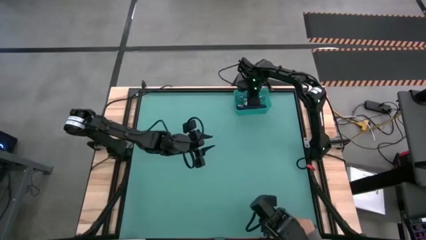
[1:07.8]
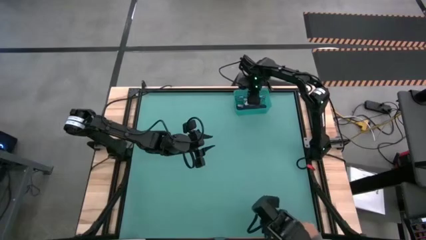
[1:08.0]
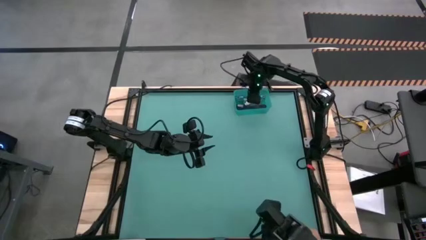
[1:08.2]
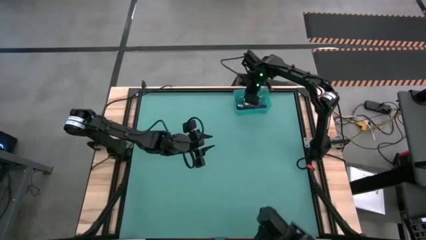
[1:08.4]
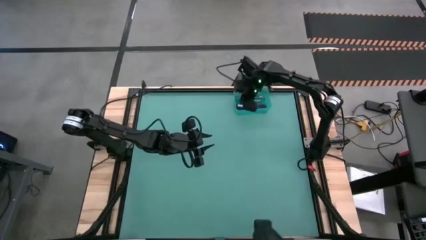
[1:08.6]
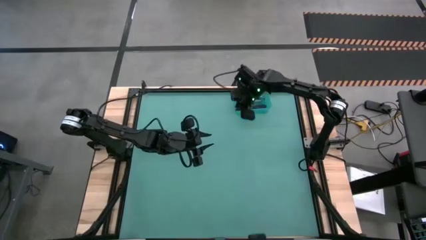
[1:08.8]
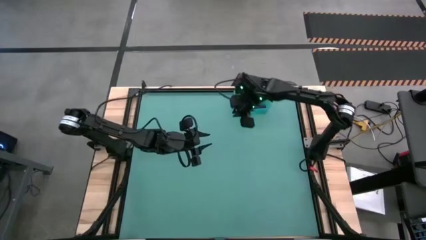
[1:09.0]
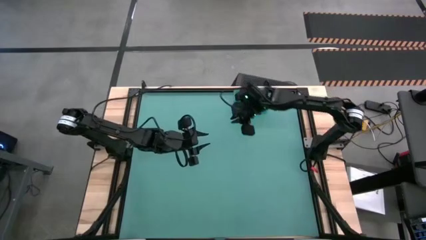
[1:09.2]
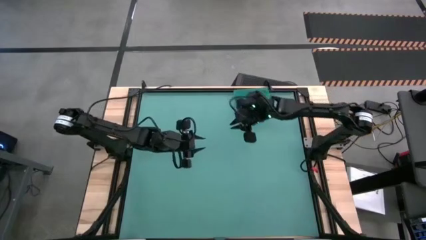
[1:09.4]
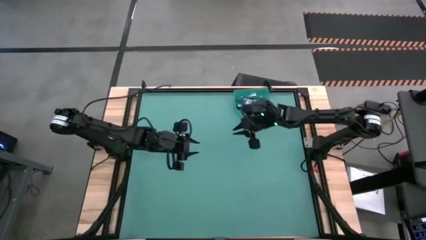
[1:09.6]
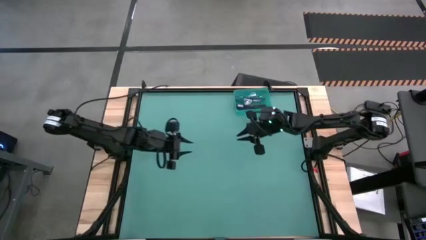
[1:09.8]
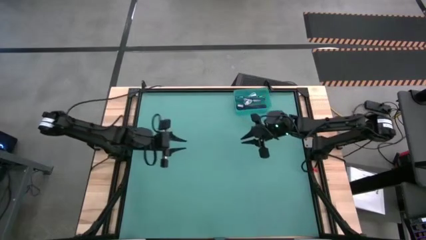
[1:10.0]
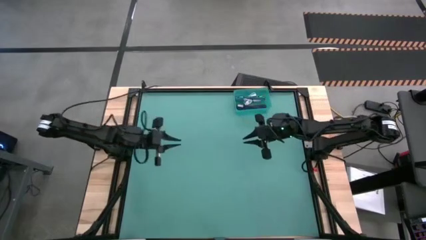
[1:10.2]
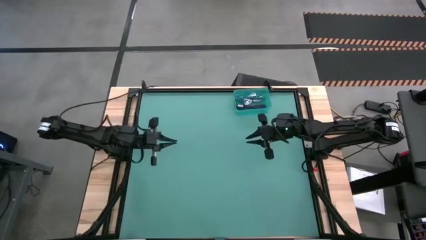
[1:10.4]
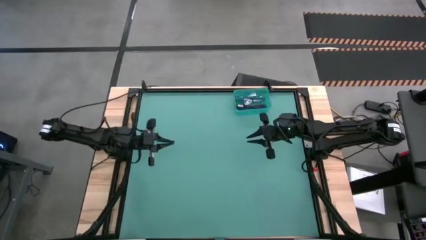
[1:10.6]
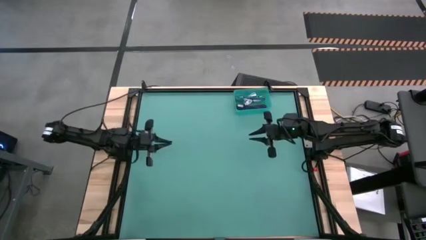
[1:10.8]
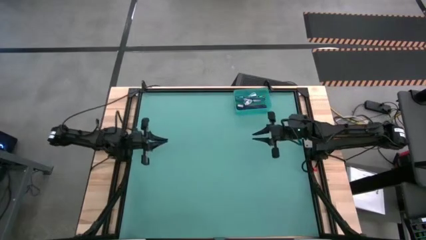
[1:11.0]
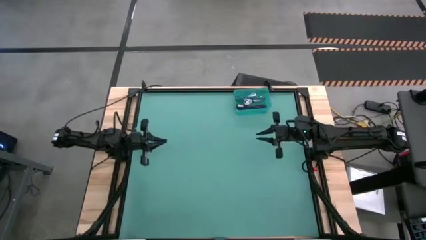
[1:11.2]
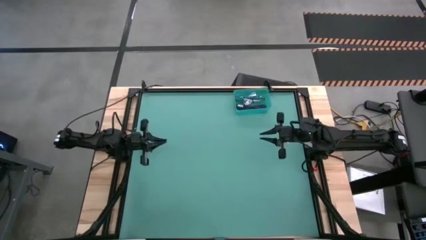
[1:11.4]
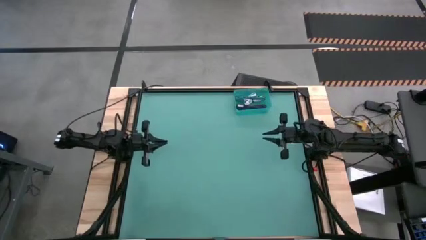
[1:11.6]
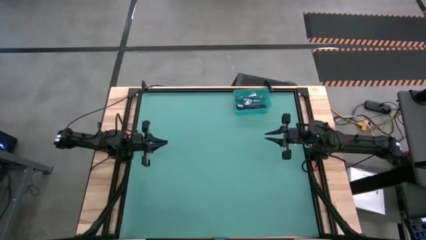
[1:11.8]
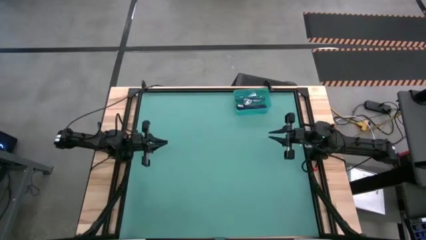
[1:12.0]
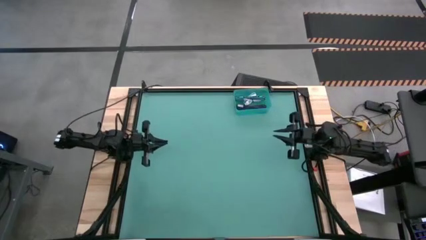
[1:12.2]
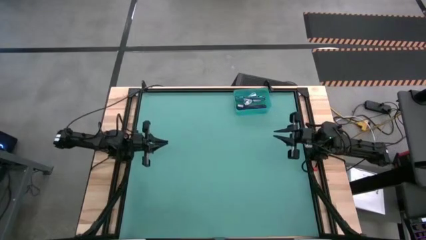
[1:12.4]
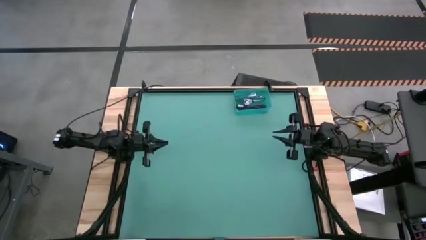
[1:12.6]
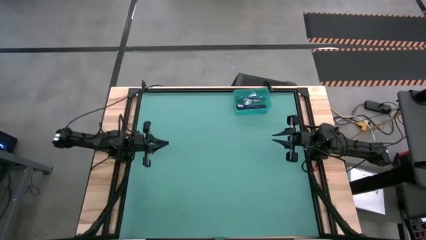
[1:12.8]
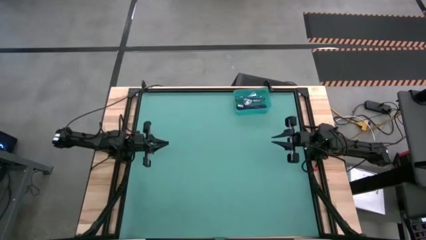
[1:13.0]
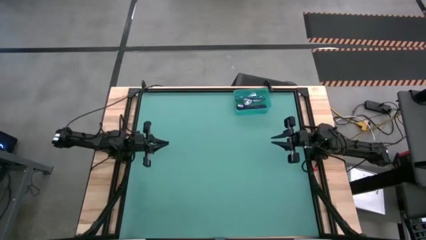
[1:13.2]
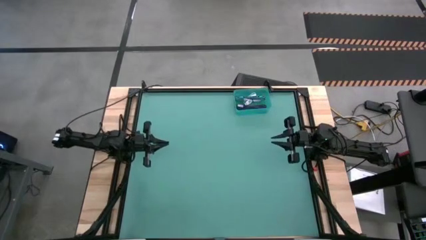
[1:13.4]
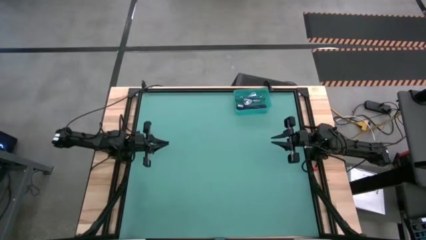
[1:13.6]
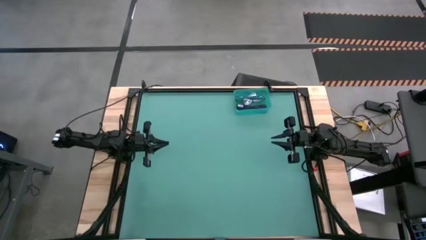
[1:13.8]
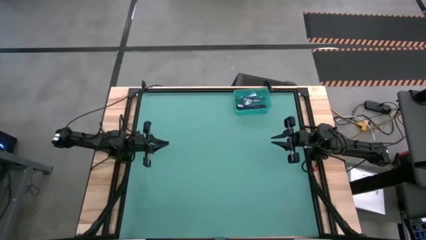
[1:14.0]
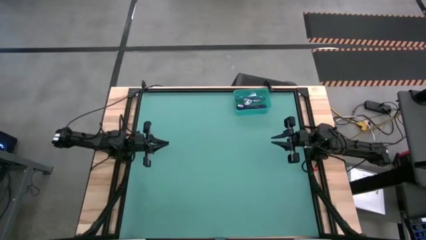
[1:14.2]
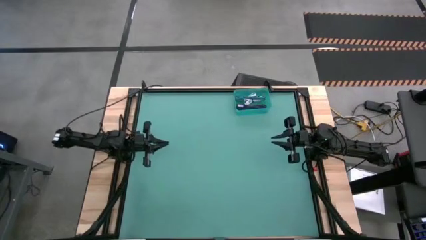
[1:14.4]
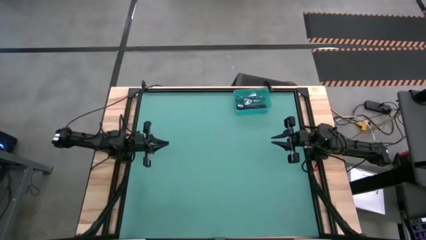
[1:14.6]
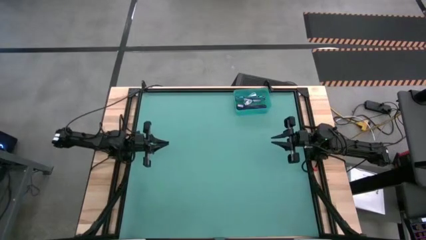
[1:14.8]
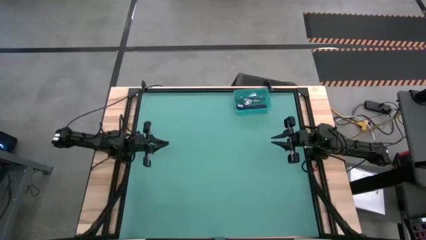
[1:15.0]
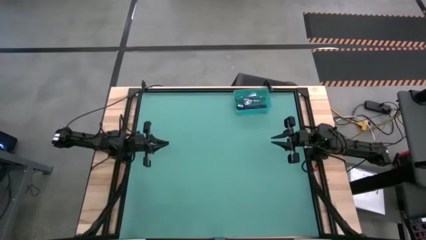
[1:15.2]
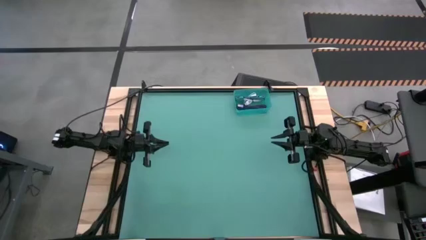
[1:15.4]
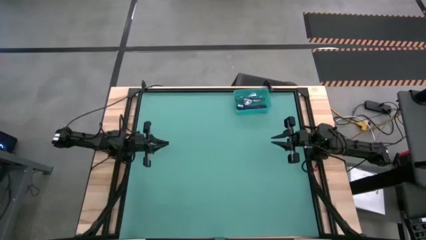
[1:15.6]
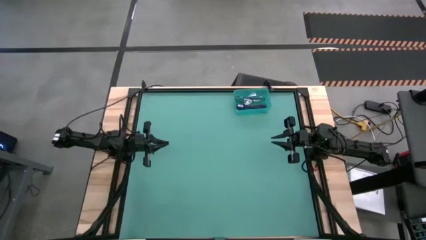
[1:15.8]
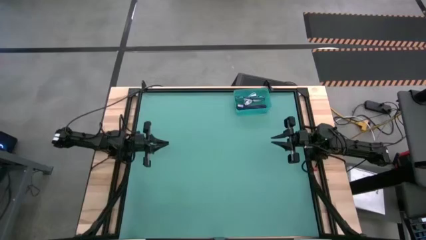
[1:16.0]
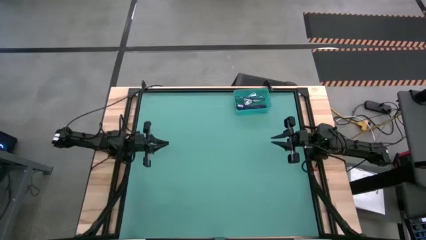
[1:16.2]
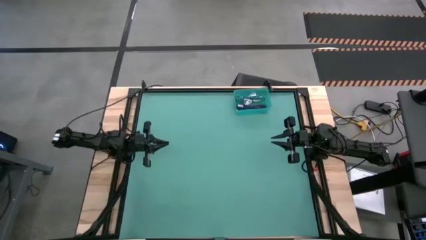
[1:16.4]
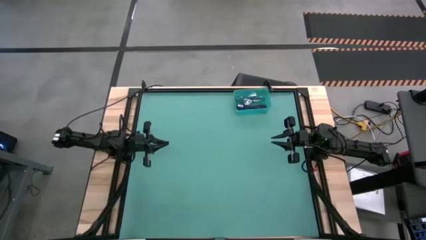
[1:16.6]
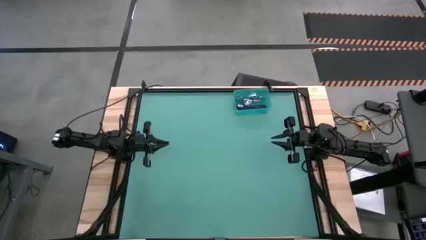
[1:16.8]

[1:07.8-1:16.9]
Task: Pick and place USB-C Cables
Return to Home Position

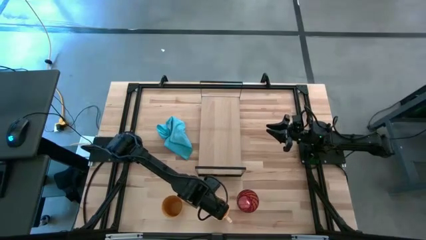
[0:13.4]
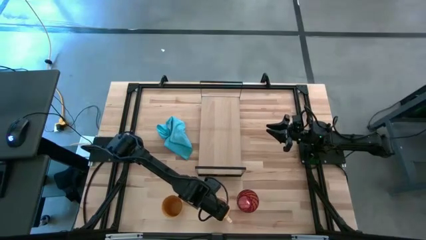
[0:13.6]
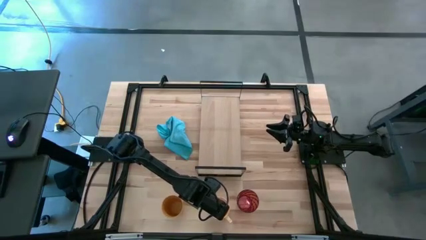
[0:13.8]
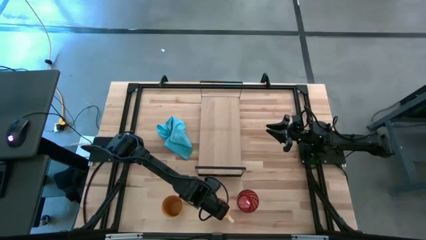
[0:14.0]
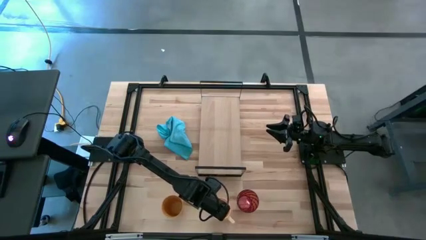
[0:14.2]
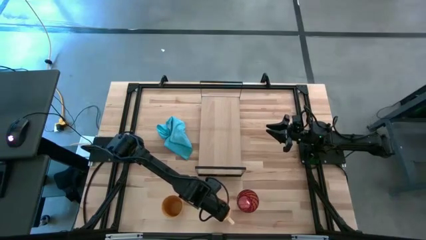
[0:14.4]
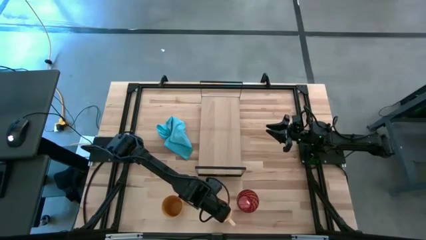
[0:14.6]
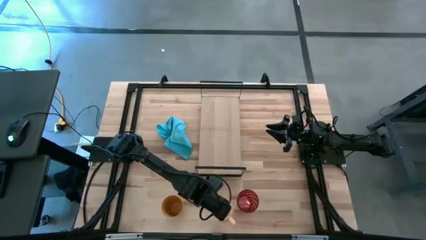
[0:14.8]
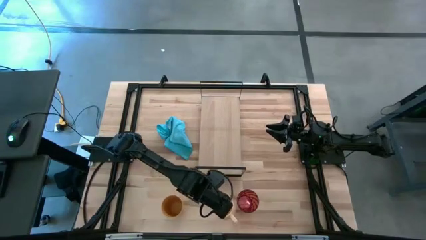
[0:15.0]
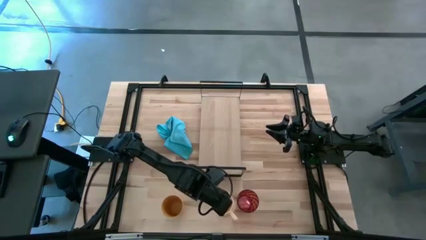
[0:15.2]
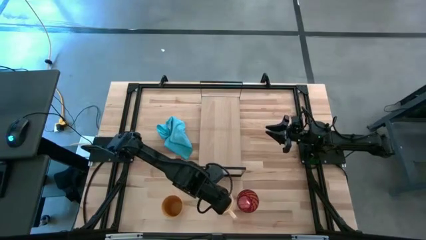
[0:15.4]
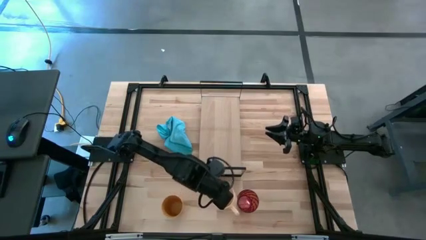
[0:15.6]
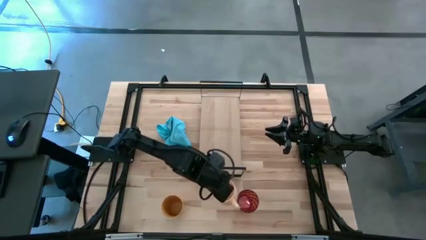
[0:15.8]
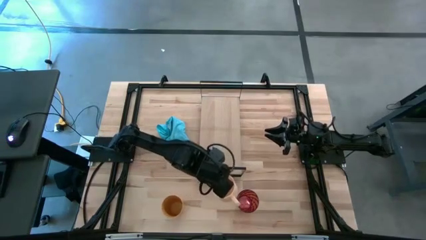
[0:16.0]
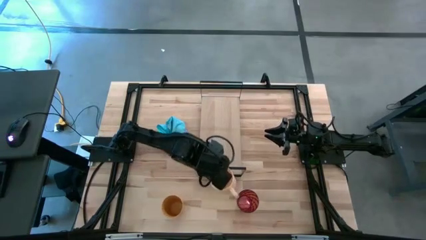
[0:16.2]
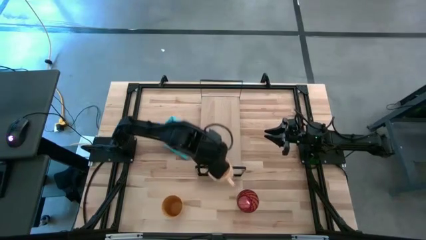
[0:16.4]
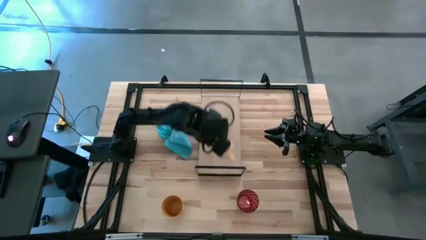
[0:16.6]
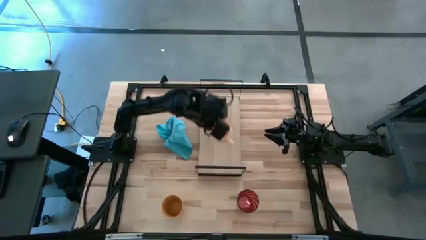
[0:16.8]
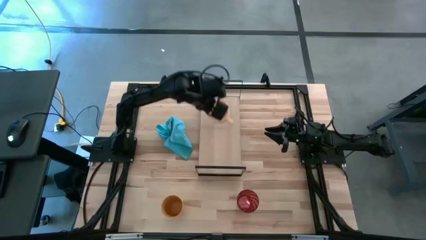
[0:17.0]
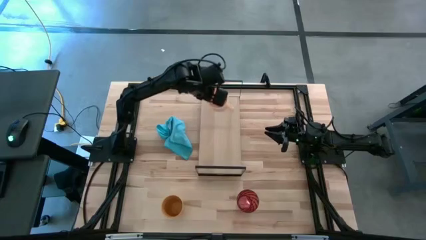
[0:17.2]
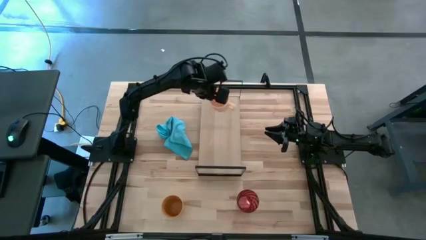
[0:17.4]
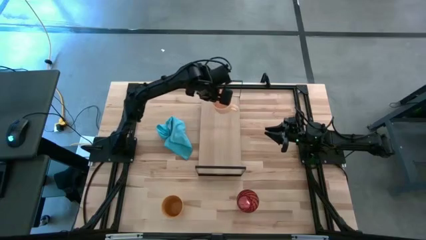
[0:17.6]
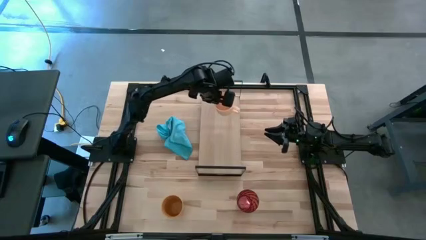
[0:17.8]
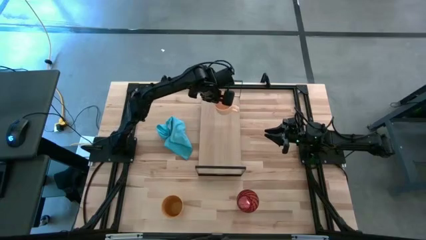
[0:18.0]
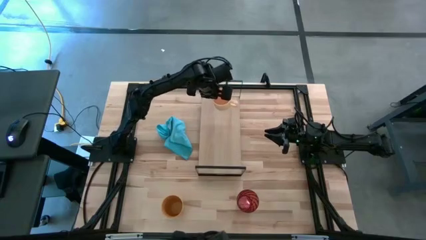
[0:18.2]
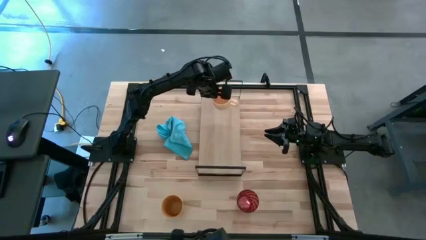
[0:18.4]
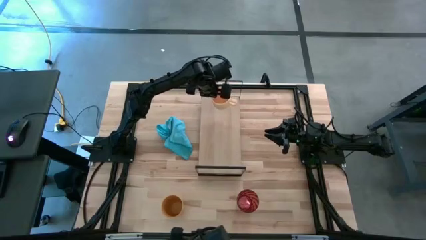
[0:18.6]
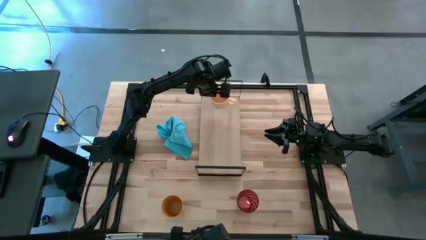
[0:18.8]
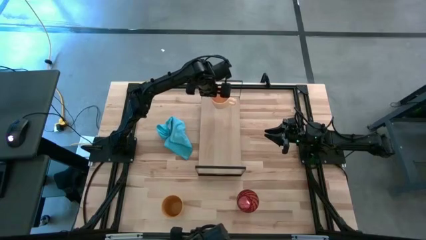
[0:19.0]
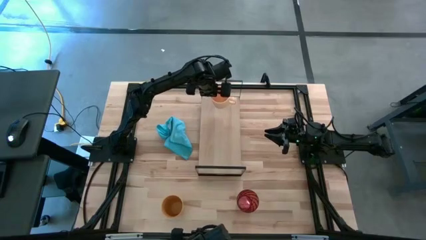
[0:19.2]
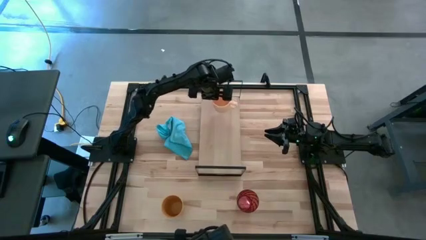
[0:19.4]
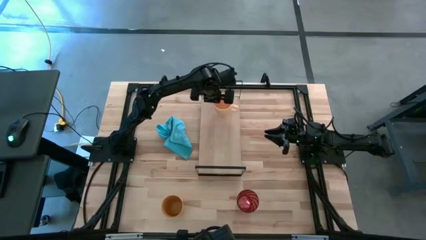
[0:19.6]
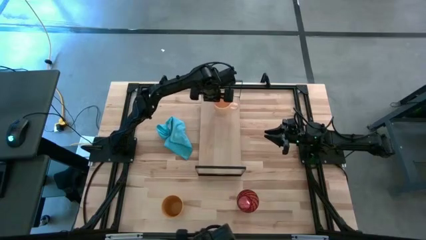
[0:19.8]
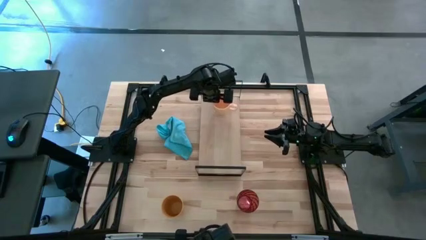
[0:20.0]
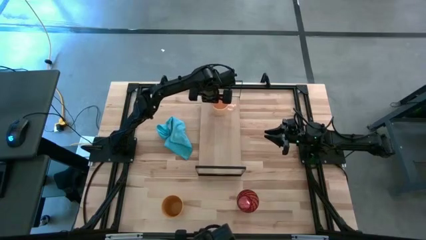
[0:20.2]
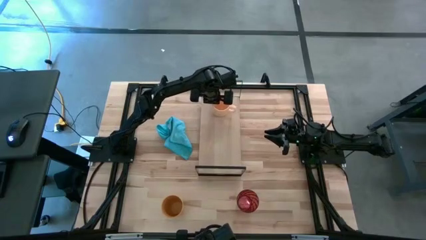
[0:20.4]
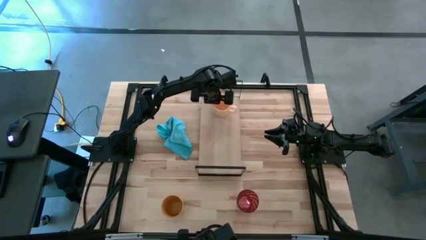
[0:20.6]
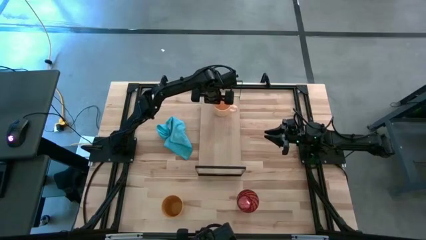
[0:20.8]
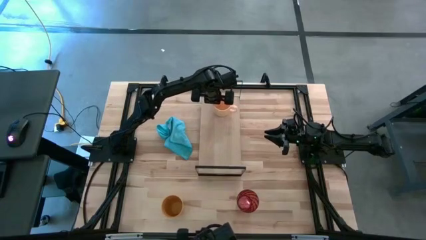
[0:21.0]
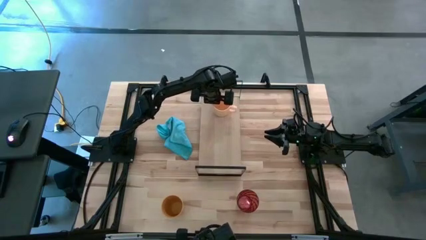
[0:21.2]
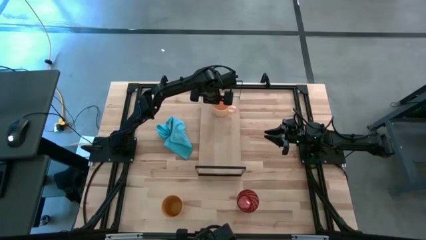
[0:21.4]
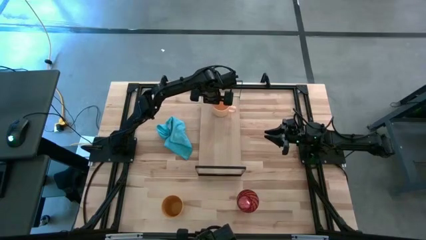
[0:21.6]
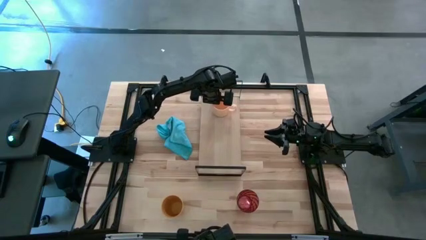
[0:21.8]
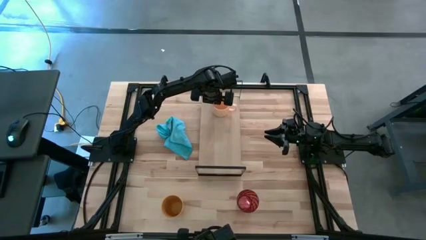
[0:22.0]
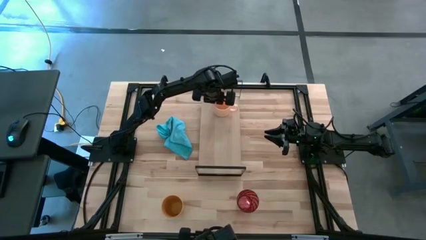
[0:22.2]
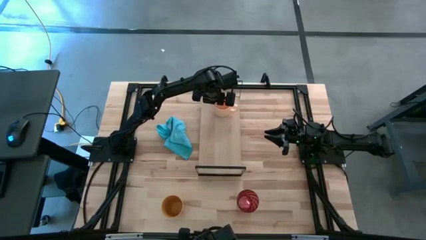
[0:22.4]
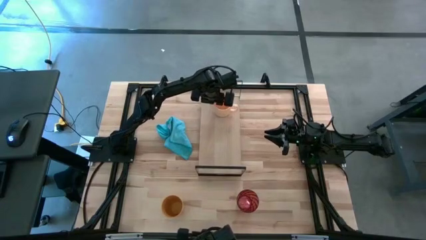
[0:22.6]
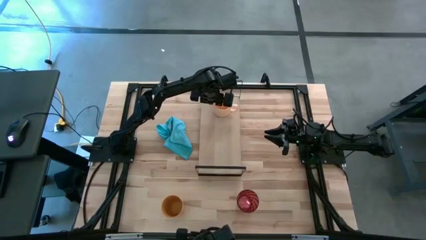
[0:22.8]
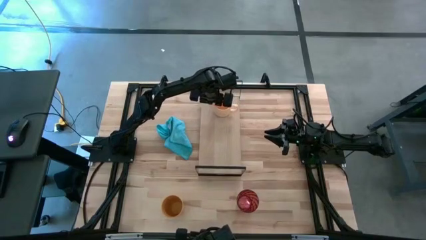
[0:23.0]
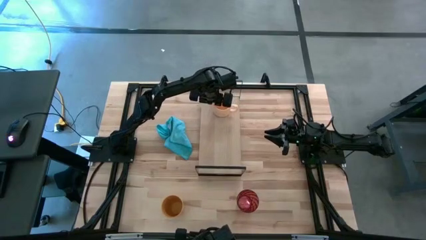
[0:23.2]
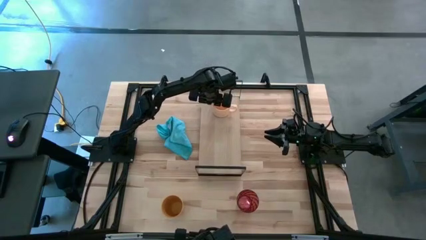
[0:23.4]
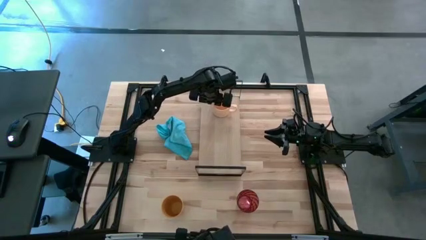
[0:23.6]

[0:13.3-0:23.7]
Task: Stack small to large cups/mugs on shelf
Put the light orange mug on the shelf
